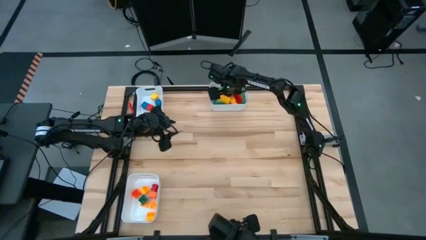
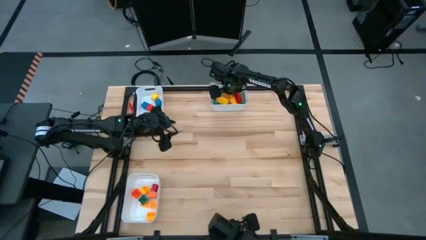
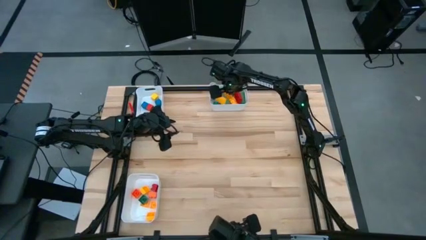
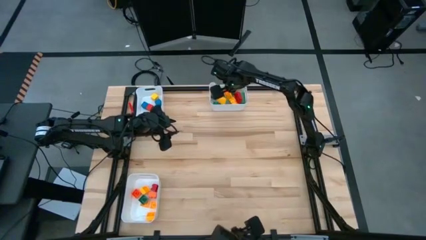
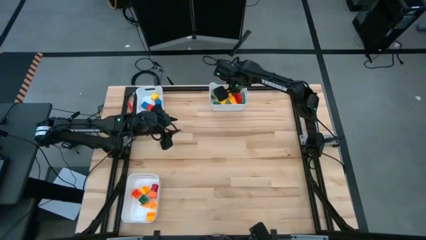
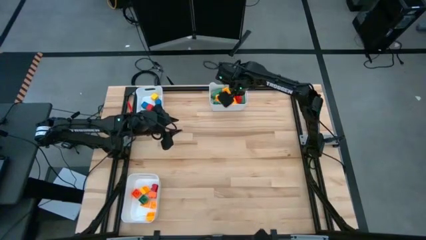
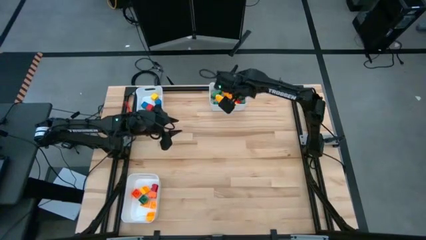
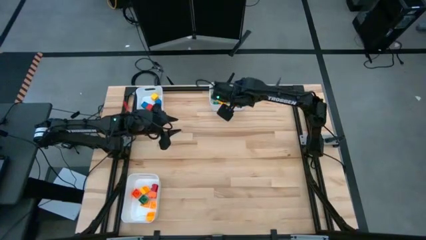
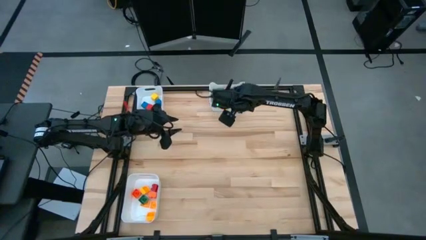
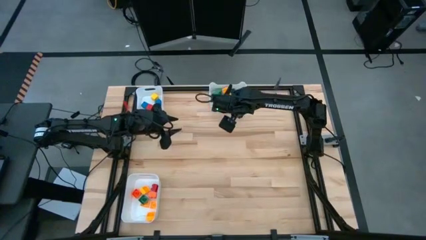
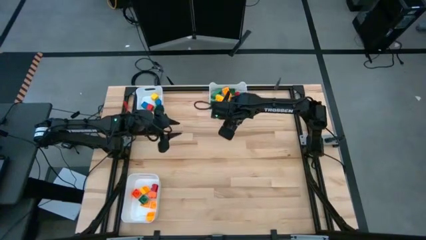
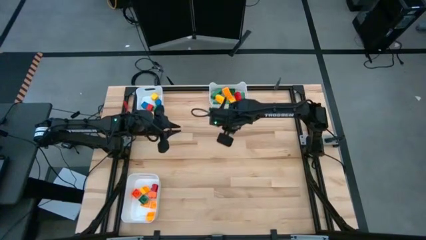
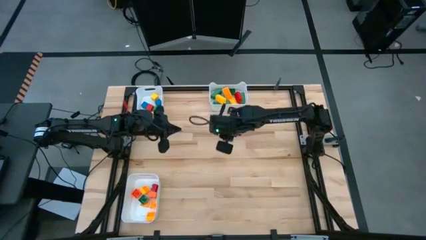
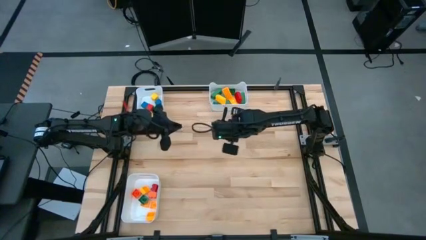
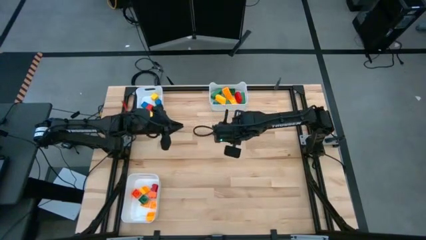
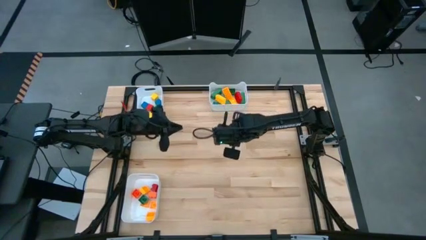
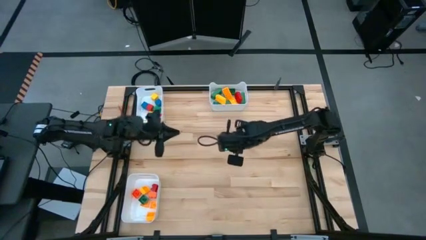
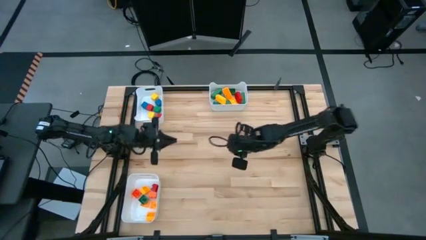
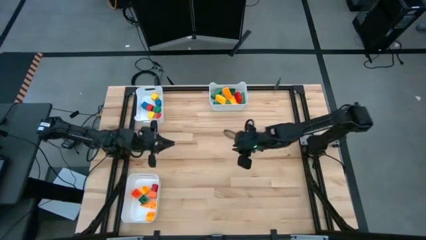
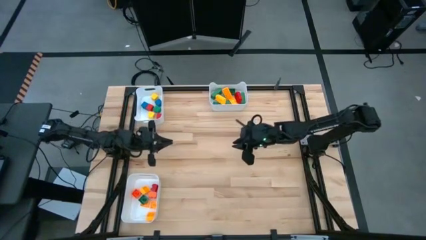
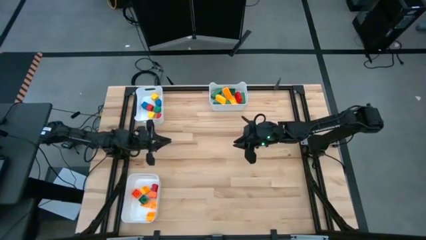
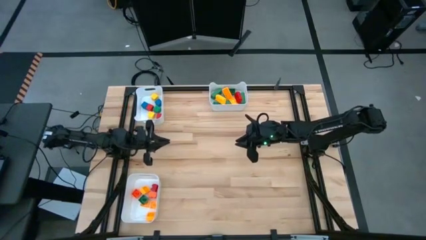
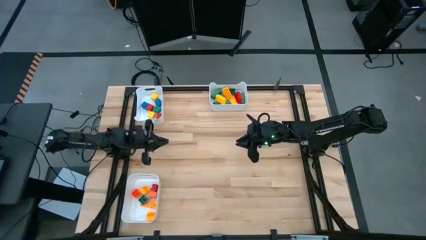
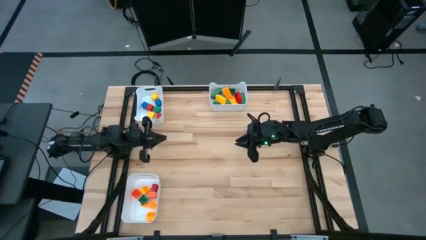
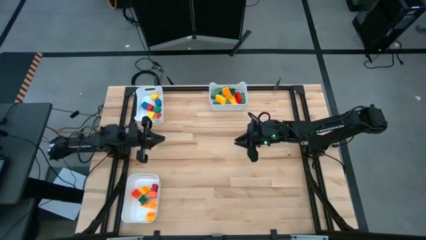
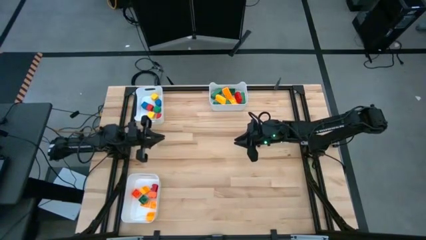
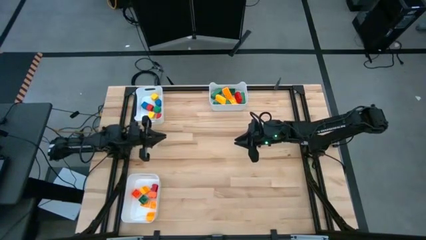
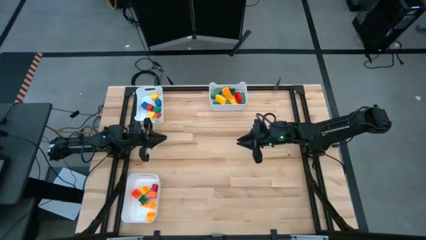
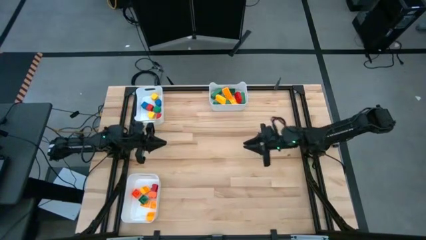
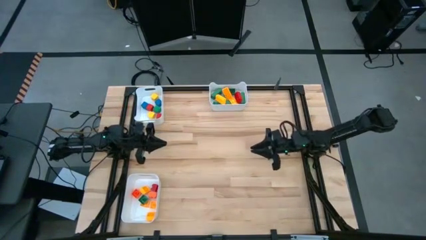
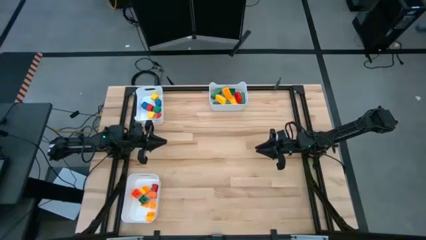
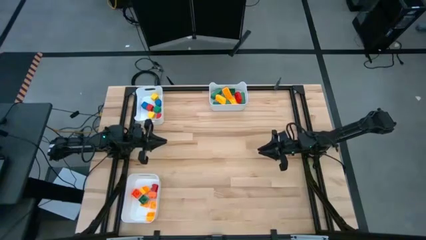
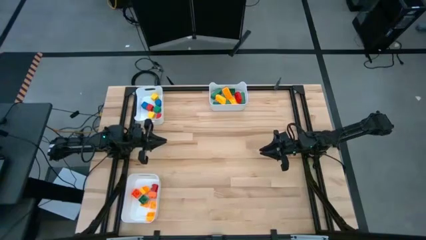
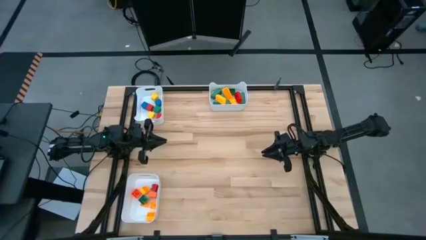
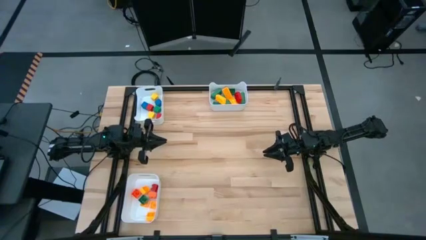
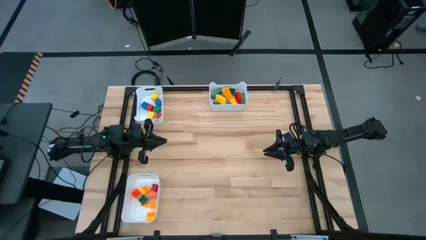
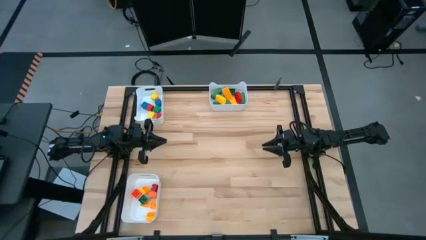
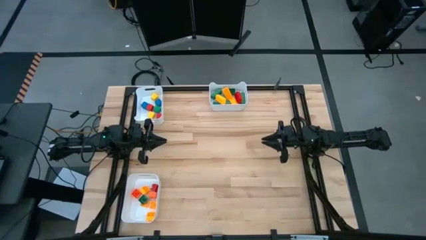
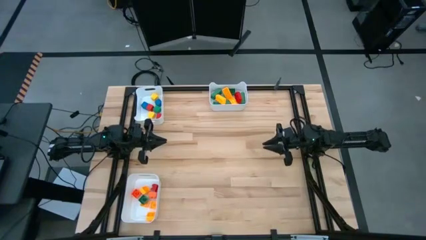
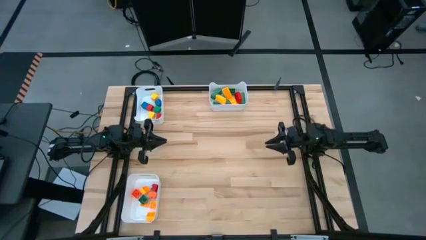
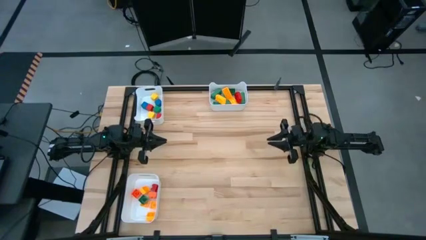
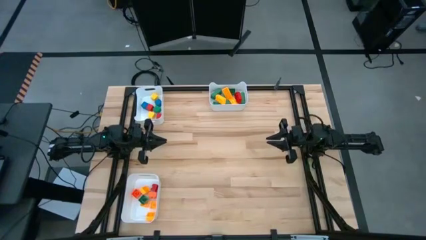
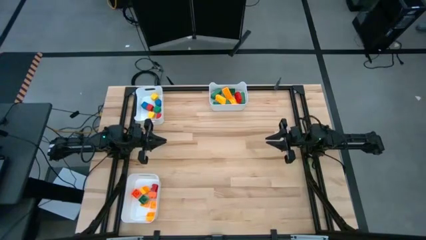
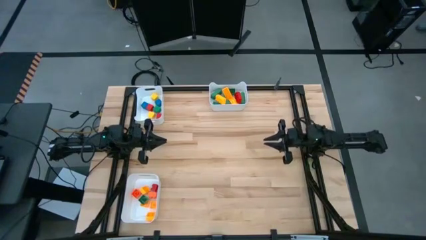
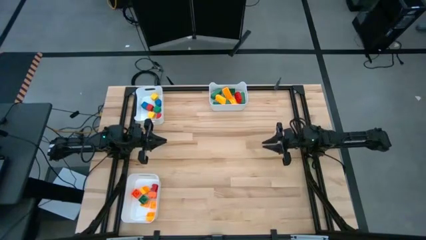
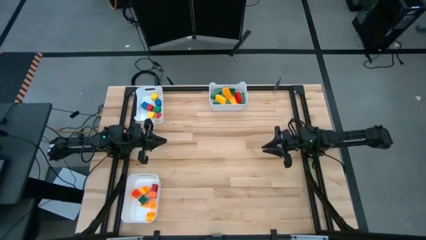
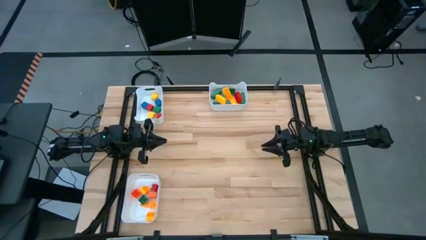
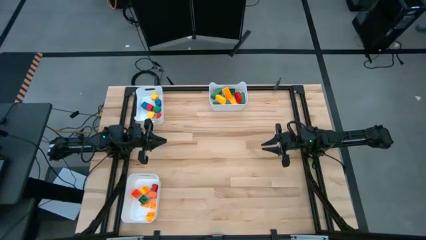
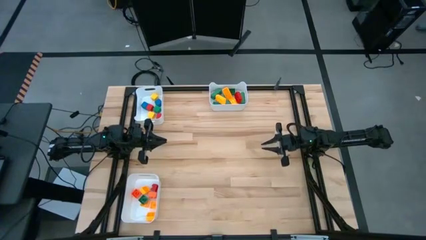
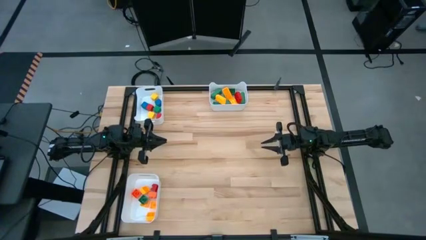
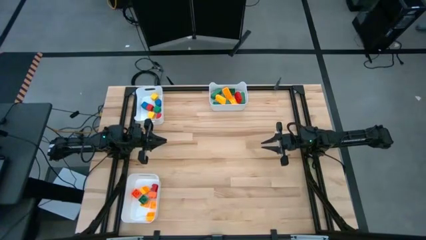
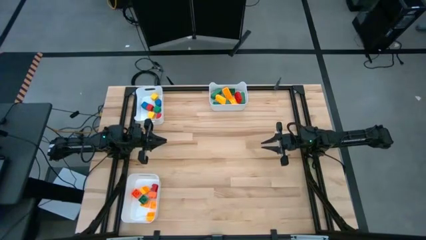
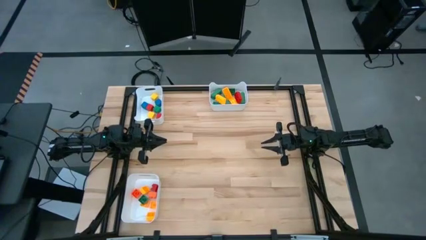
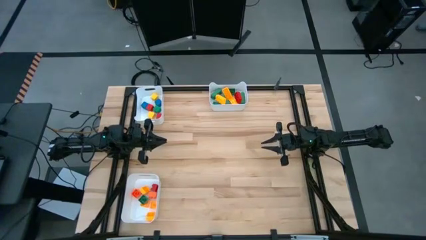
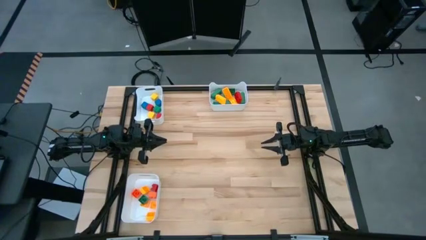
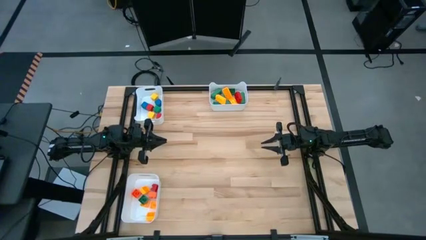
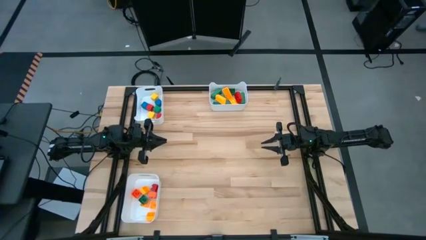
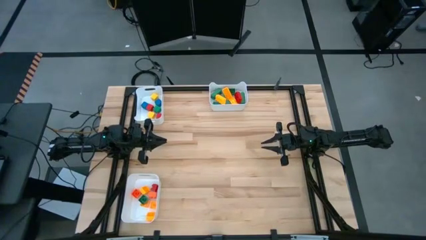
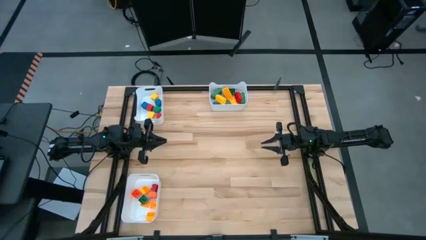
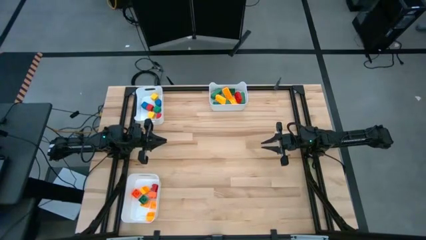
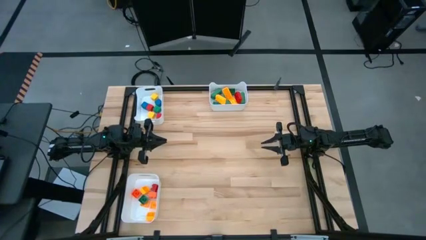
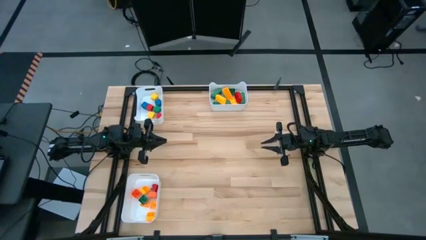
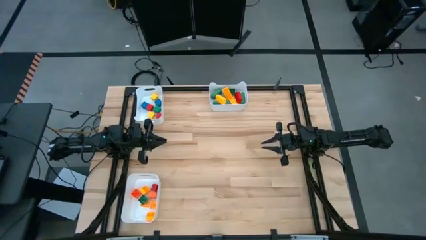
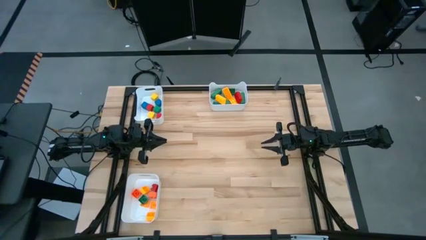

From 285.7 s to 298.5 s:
Task: Sort blocks by size
Return to Home position

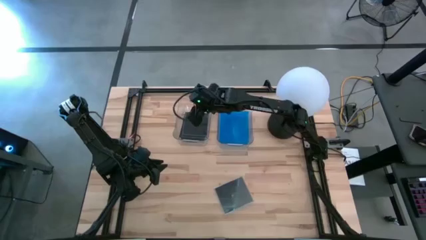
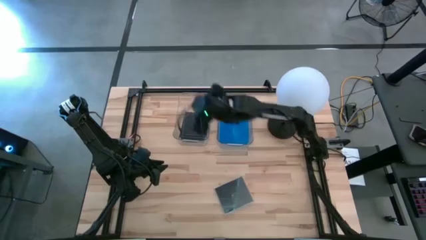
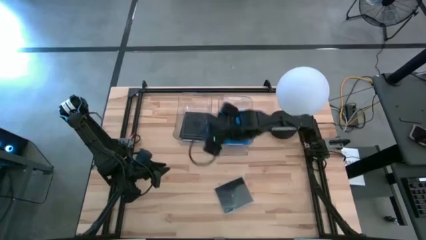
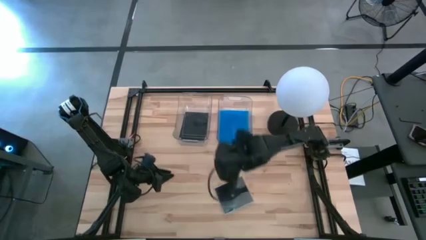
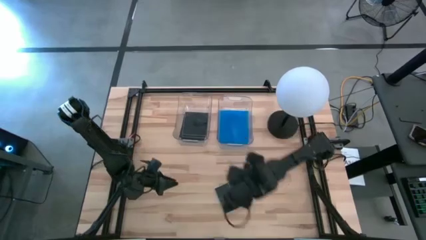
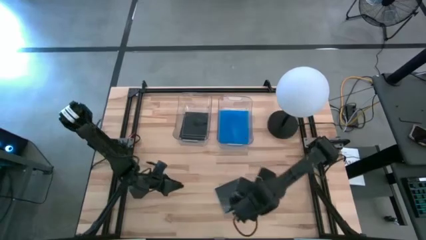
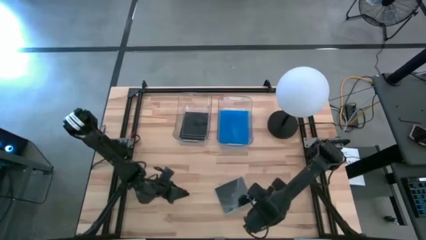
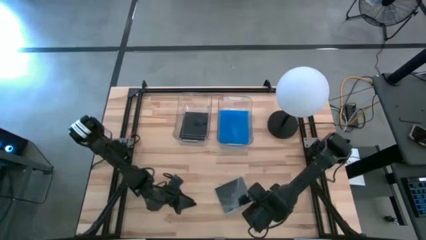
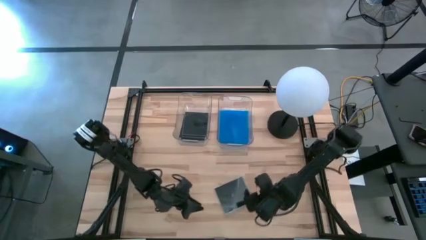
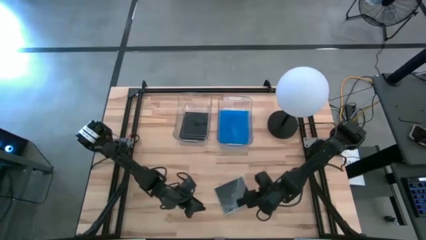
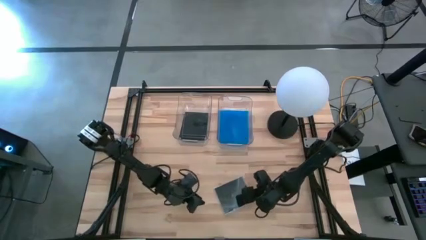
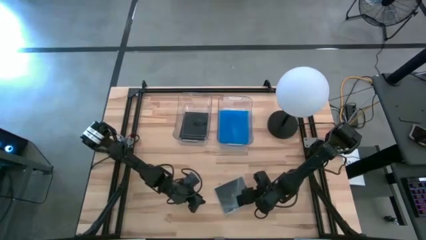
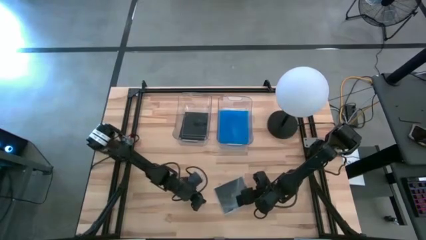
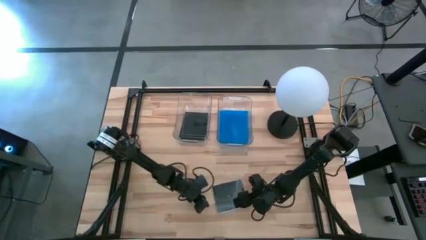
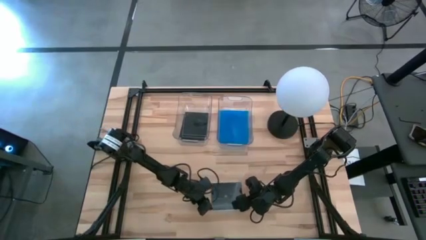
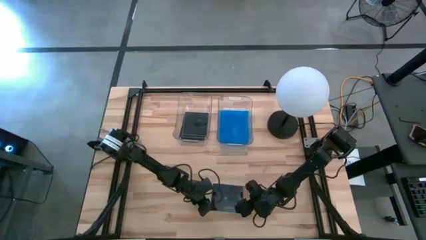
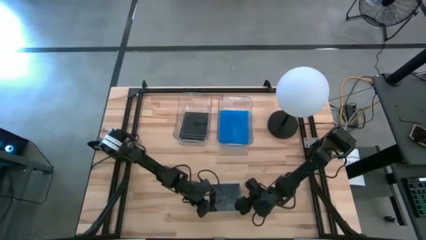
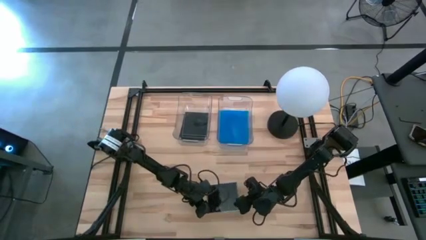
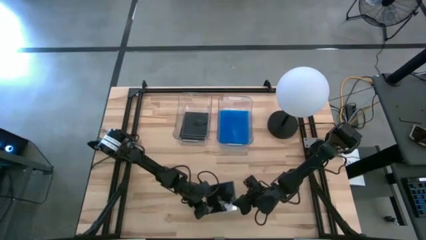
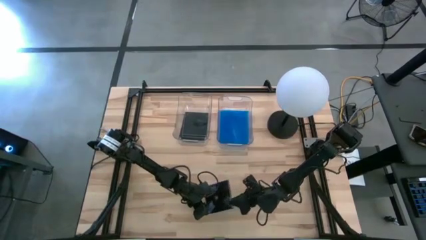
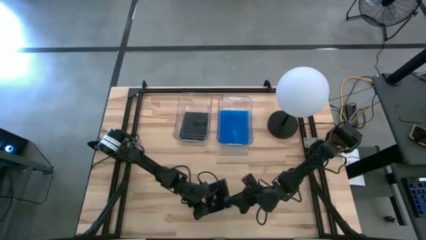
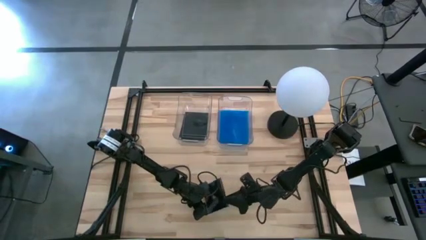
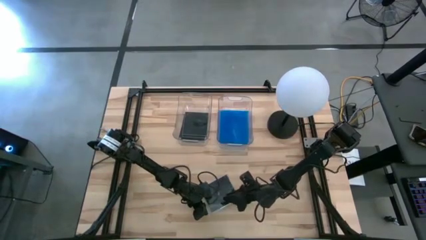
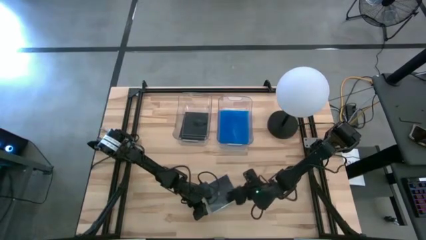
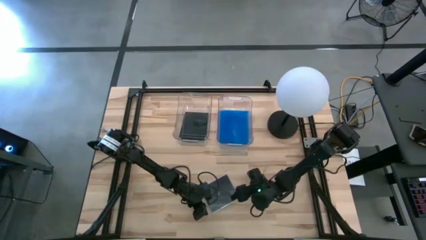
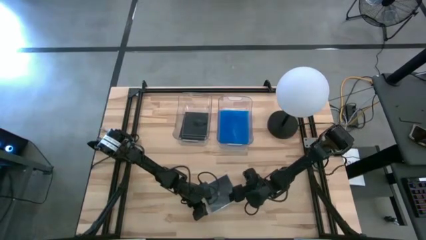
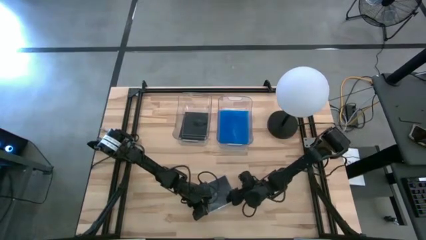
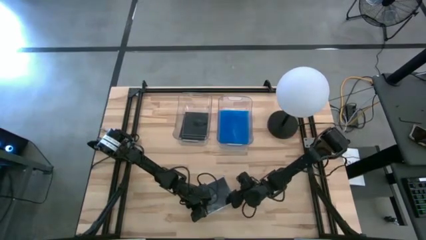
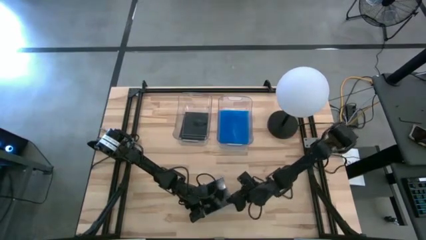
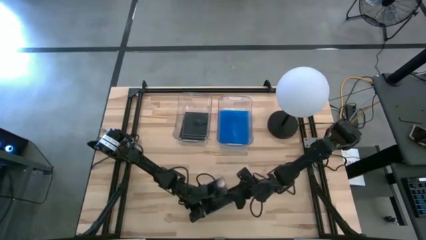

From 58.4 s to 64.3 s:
Task: Pick & place jewel cases by type
Put the black cd case into the left transparent bin
